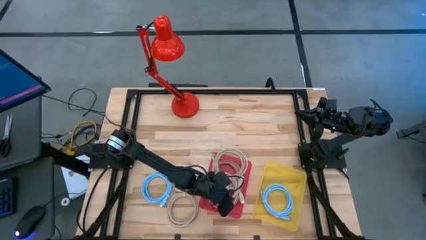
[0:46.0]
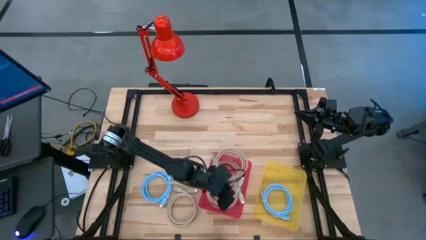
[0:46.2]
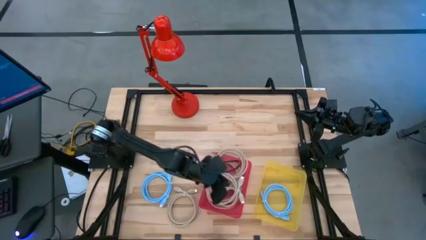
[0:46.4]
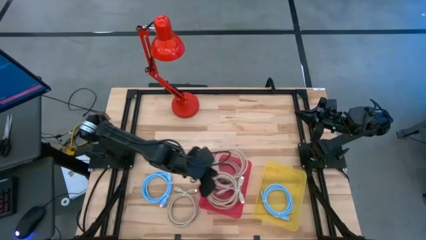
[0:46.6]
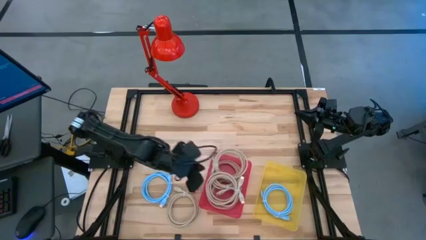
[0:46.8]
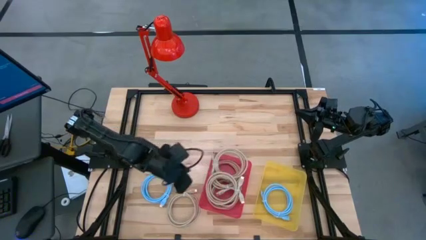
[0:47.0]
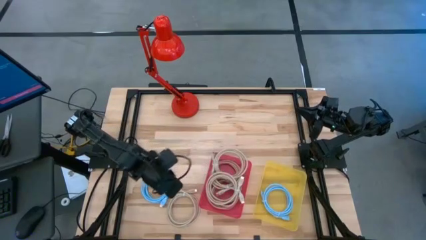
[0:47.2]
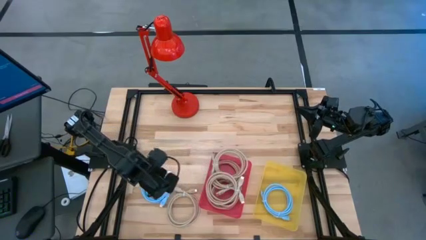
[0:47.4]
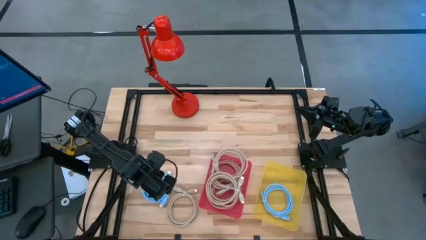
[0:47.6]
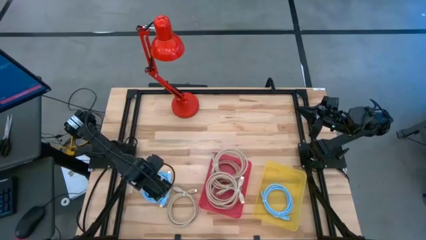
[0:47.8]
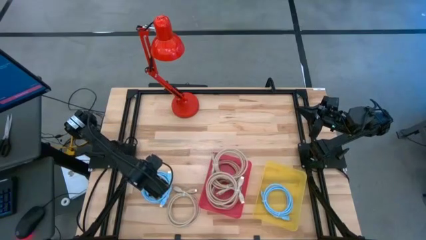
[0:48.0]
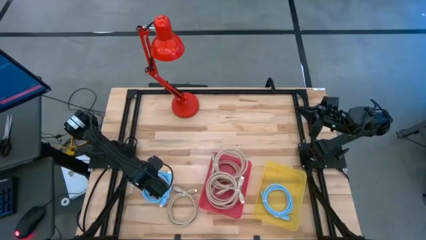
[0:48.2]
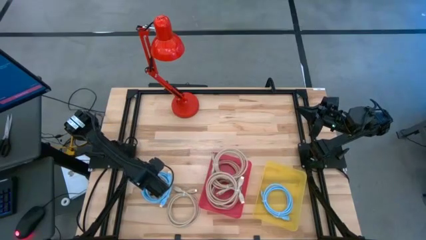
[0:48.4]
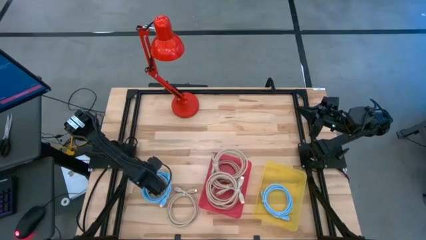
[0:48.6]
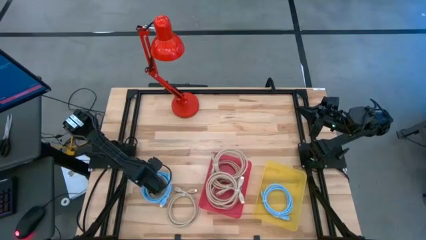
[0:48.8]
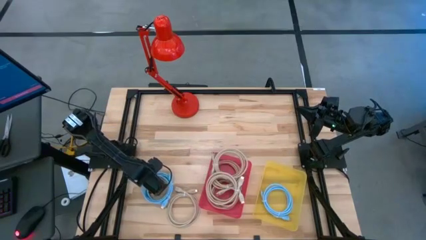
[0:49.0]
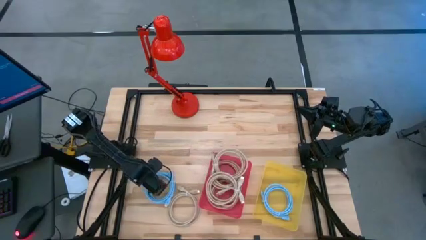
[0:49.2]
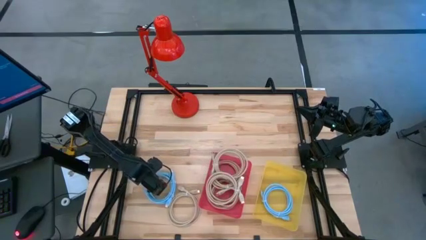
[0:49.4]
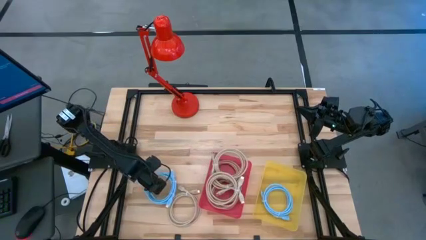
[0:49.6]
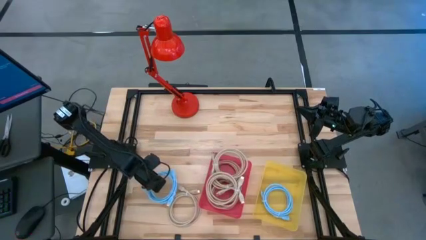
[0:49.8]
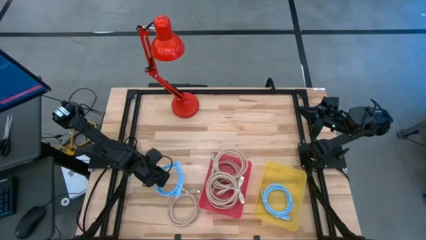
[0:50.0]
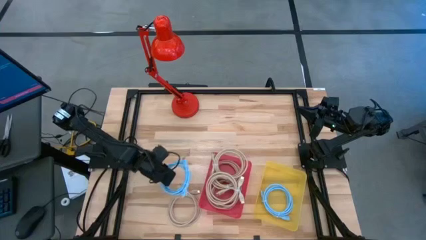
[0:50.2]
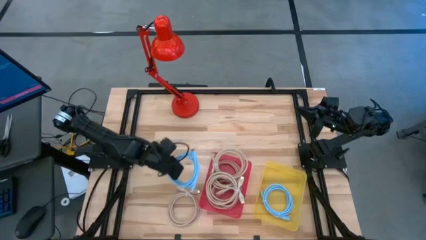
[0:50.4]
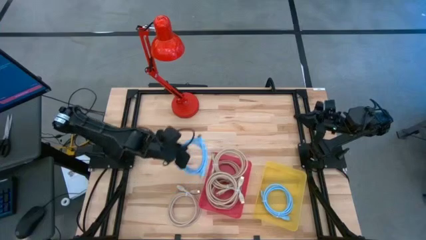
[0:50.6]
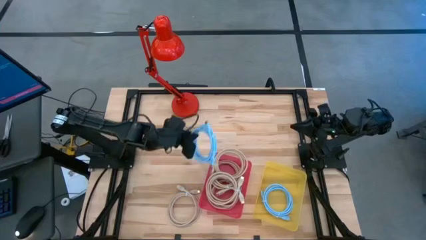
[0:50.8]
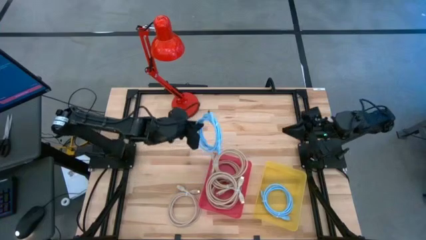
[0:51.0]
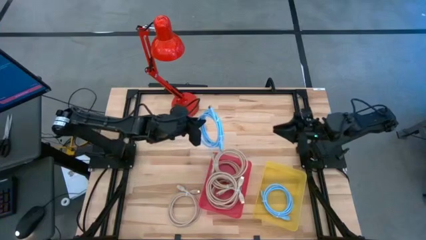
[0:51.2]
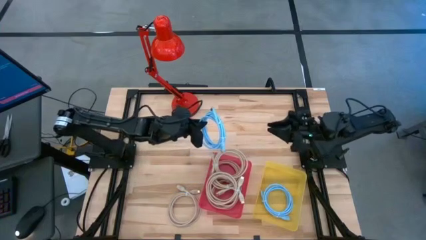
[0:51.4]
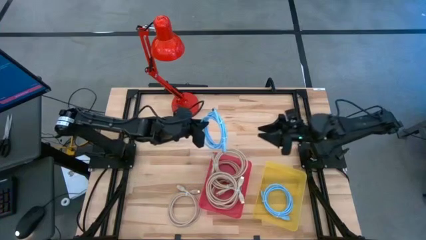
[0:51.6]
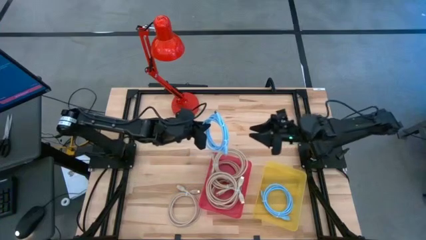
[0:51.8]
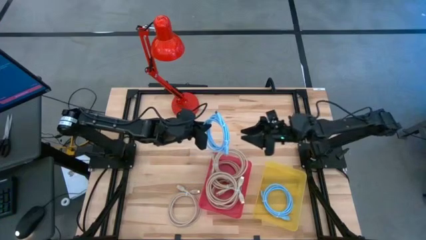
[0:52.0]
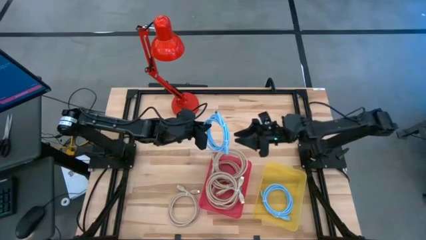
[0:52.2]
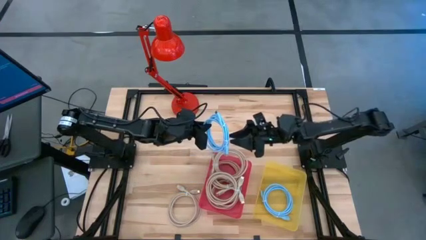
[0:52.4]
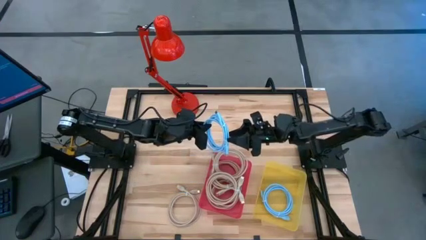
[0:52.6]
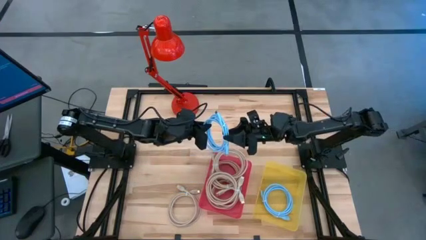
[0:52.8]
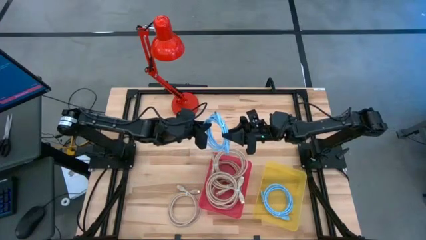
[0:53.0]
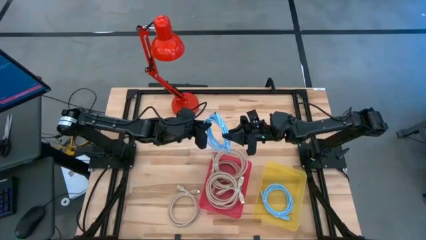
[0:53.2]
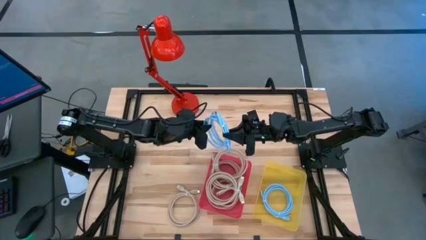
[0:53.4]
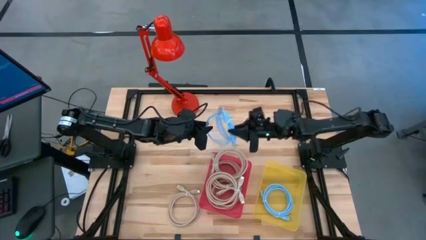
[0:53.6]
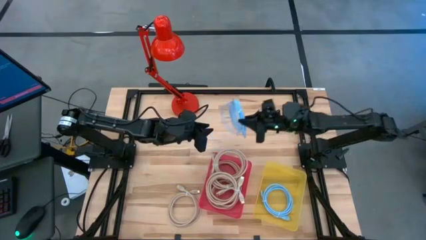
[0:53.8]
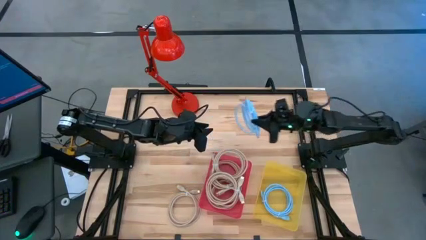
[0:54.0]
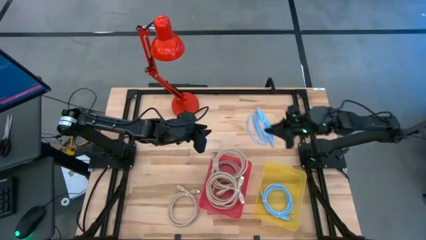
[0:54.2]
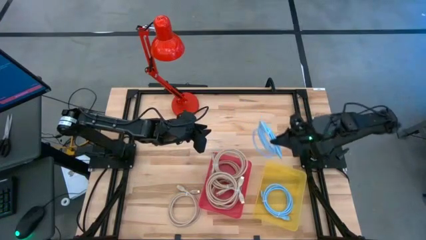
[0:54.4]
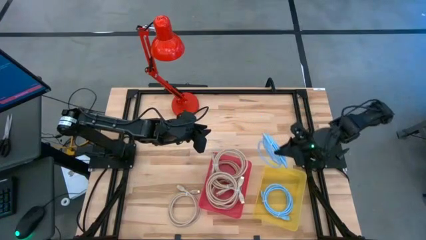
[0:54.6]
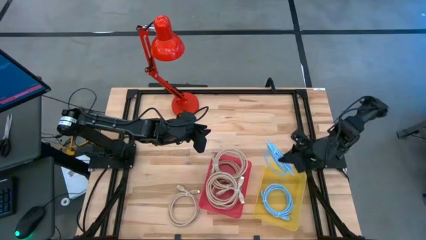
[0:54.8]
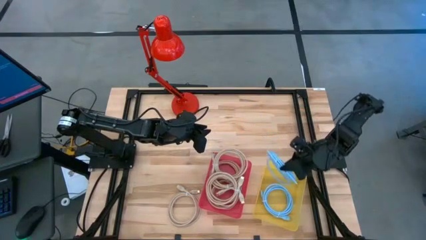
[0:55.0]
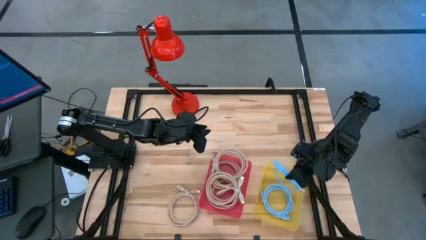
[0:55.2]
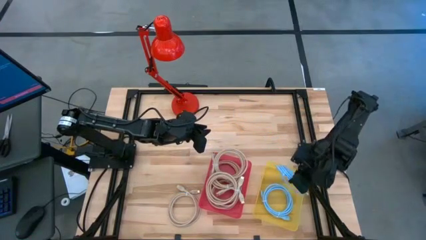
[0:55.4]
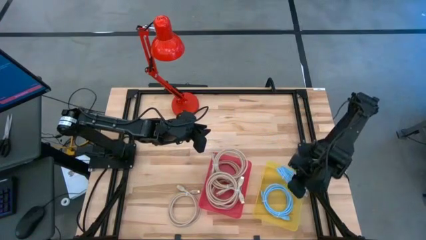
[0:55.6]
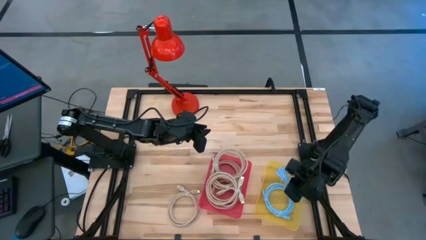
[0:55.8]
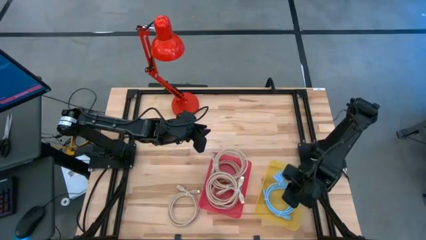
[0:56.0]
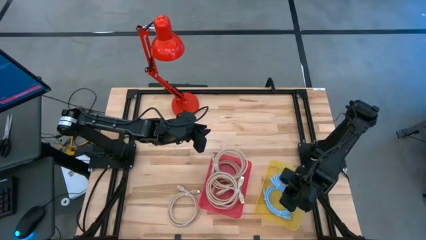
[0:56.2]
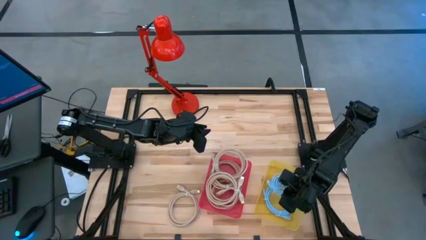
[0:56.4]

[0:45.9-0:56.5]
Task: Sort HDMI cables
Put the blue HDMI cable into the yellow bin

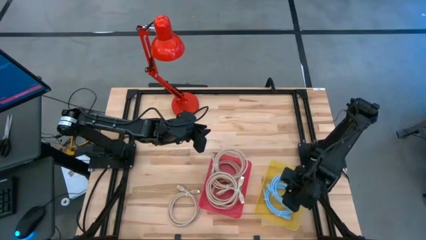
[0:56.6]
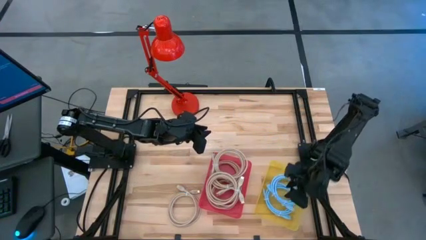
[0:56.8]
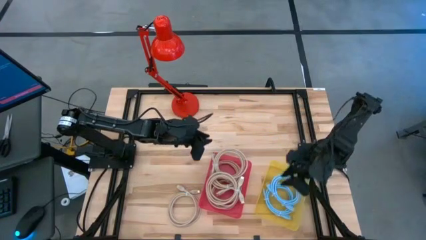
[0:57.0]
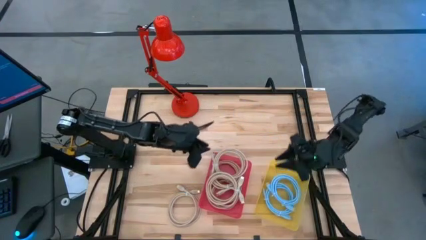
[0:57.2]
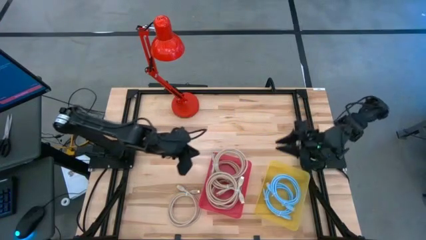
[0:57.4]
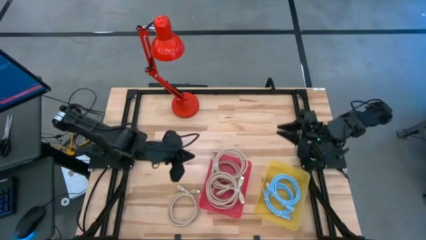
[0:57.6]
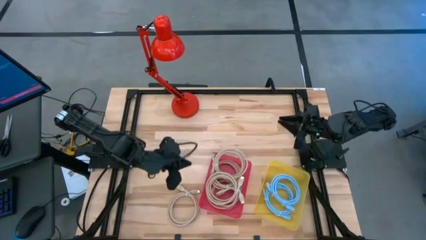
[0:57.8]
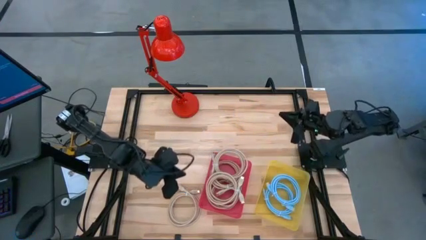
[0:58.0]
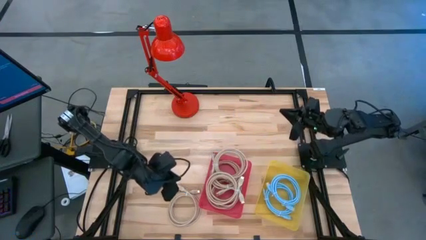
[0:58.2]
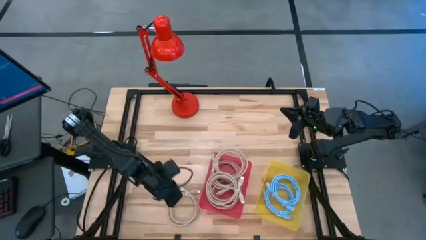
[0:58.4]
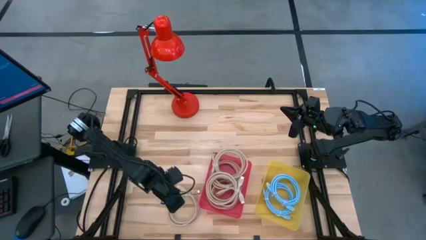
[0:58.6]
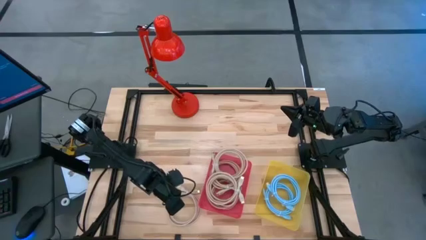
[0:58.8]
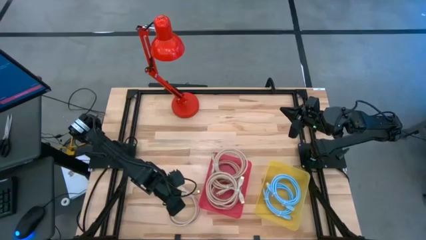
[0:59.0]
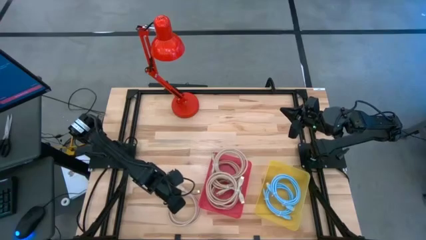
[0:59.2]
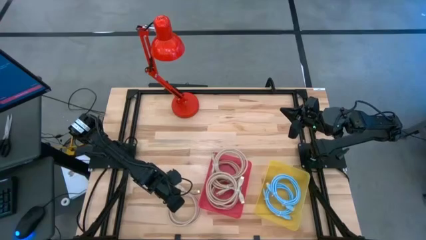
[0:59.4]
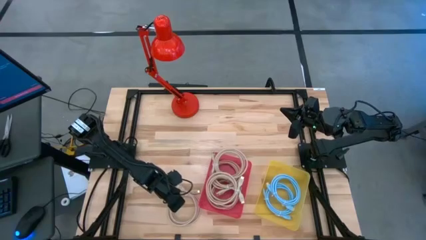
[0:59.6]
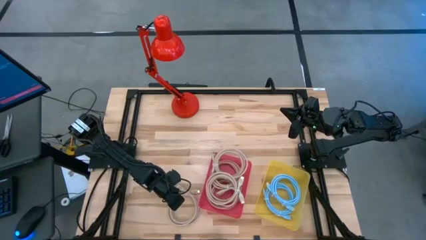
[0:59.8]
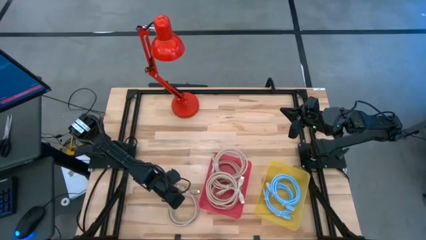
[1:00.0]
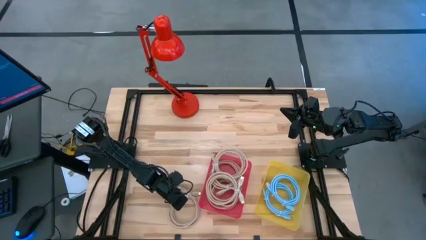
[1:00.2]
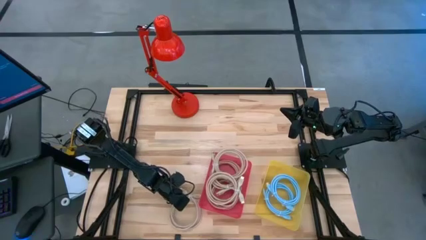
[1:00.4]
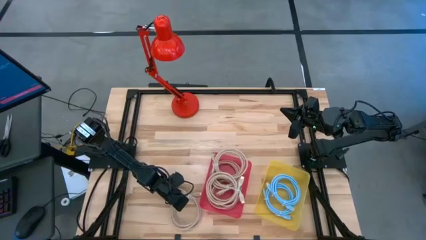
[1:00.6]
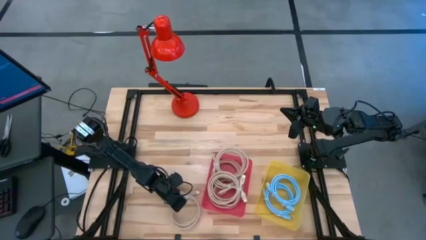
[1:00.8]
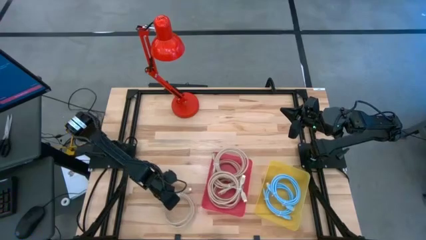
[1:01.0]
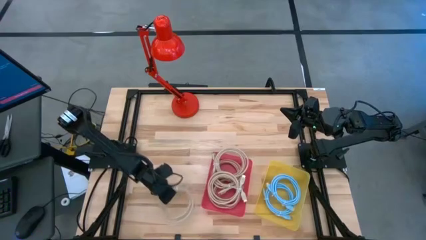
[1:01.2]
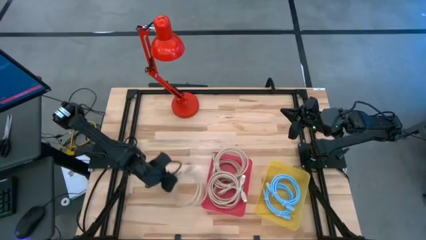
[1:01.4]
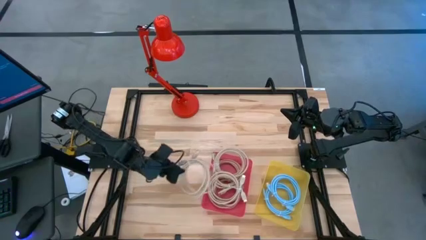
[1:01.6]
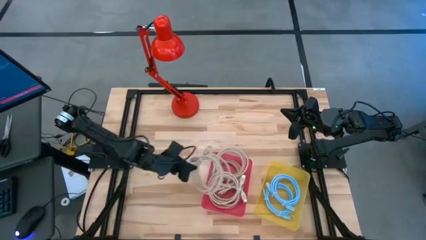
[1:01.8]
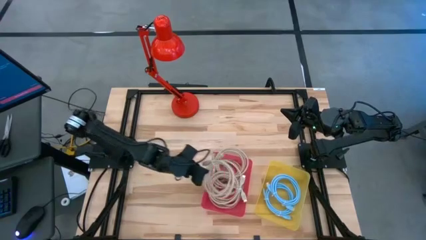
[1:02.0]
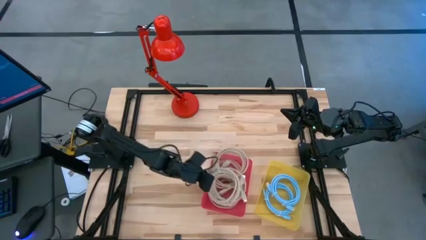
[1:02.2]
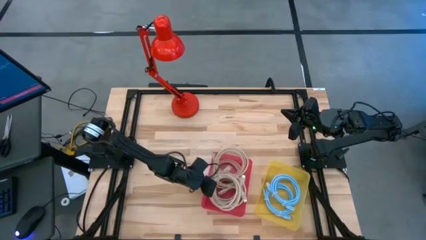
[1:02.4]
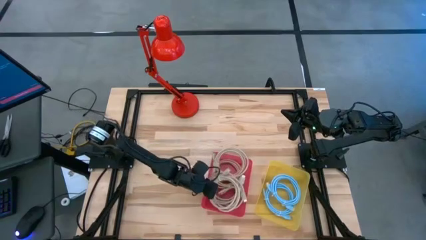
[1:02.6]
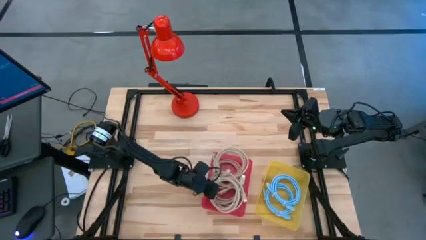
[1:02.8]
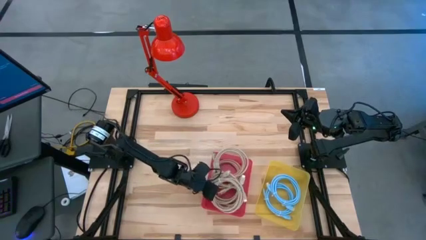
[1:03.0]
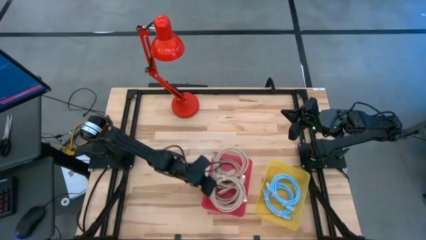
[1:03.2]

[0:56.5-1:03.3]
Put the brown HDMI cable into the pink bin
